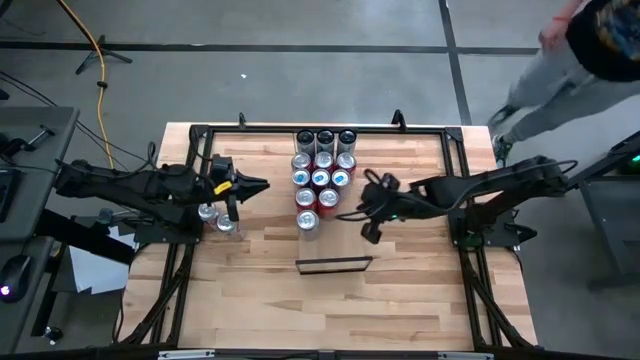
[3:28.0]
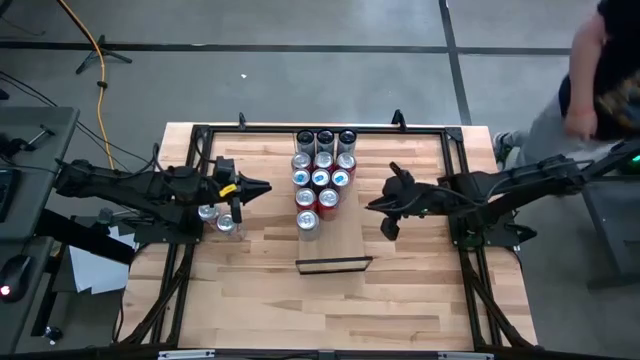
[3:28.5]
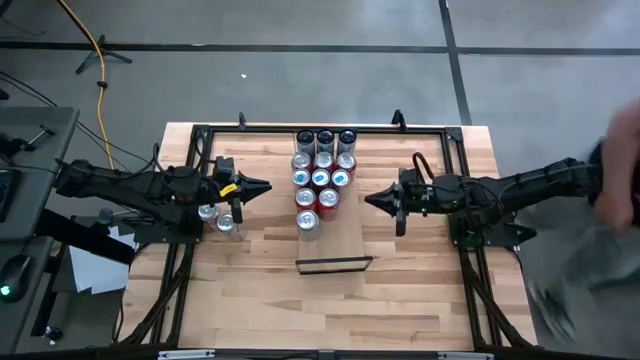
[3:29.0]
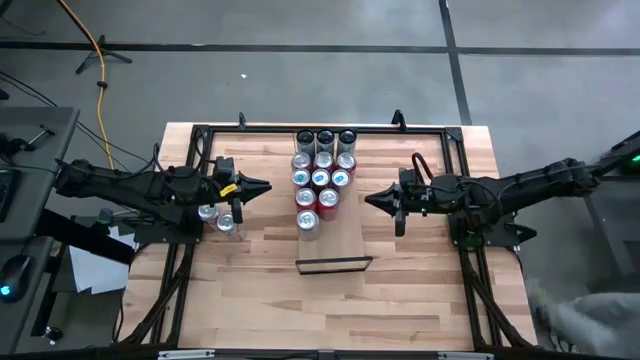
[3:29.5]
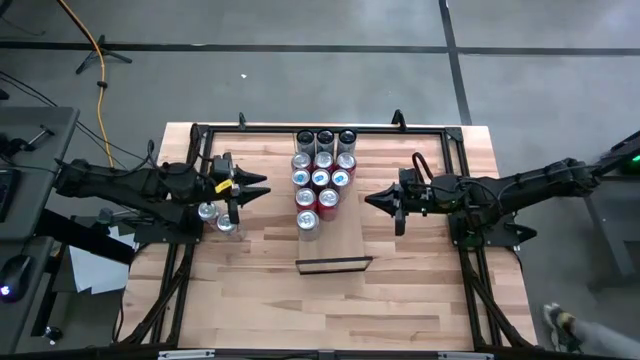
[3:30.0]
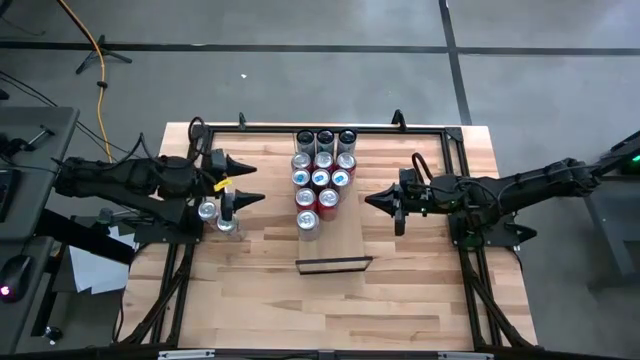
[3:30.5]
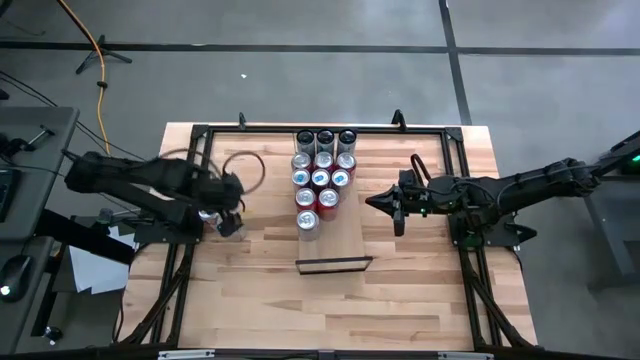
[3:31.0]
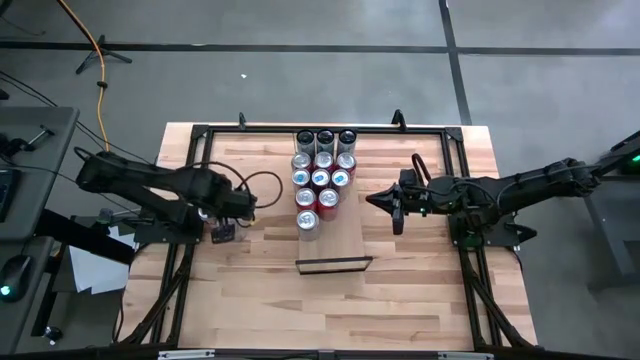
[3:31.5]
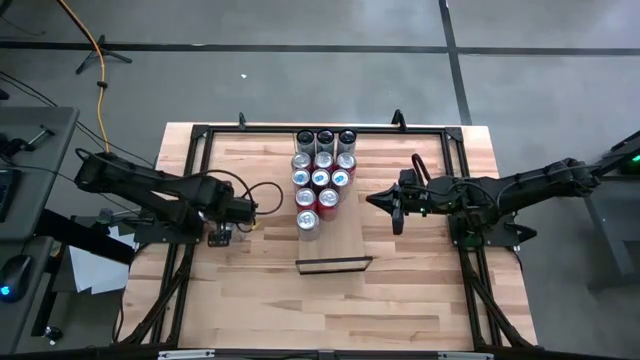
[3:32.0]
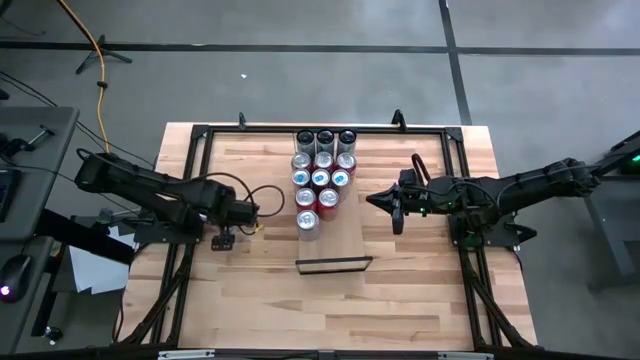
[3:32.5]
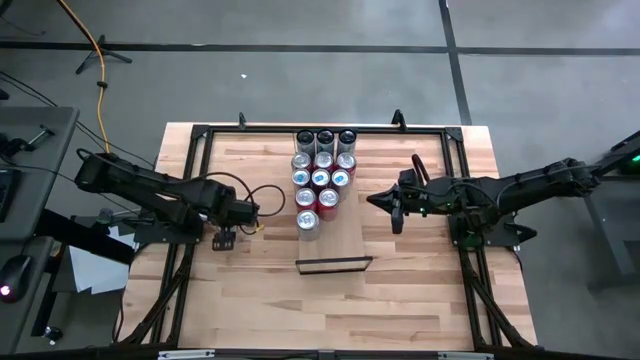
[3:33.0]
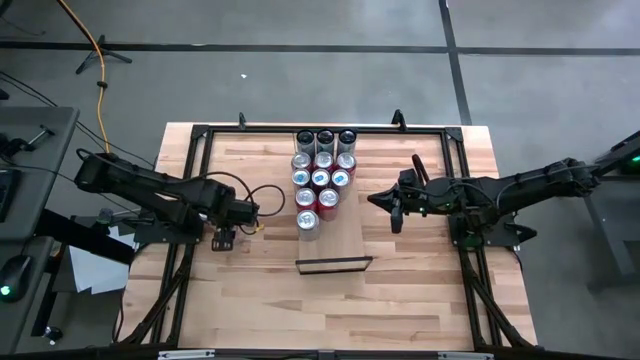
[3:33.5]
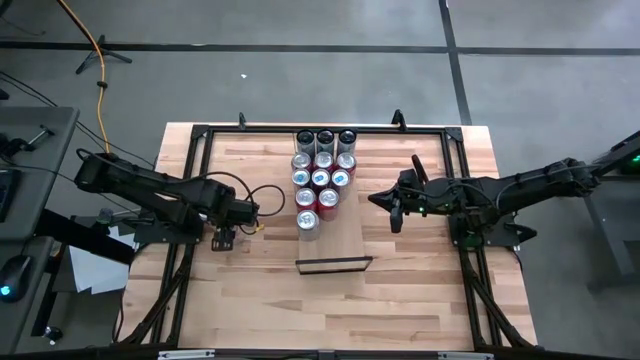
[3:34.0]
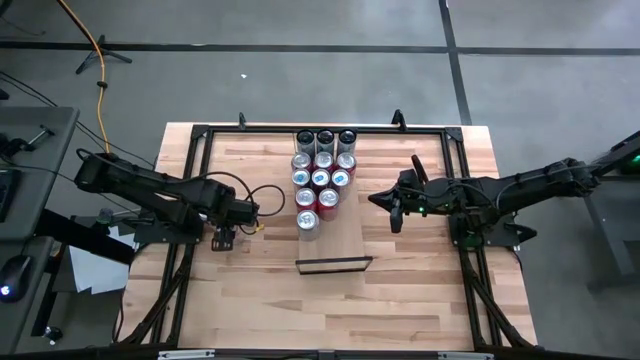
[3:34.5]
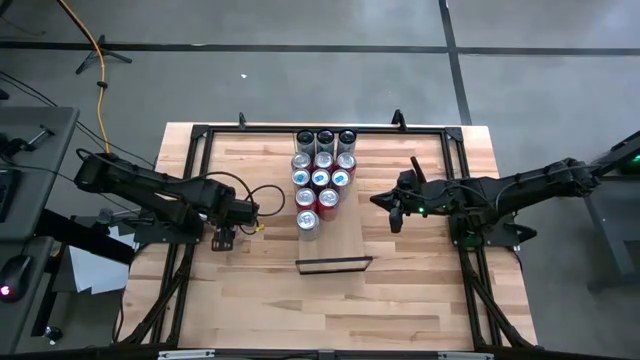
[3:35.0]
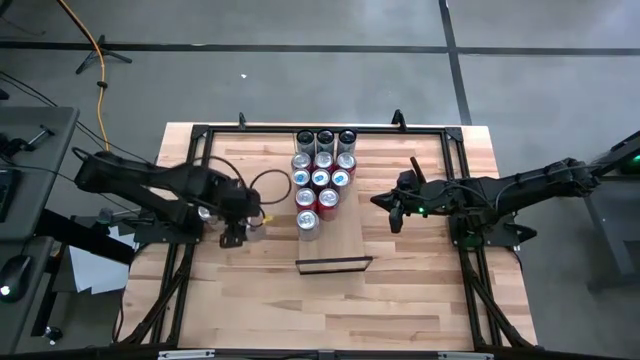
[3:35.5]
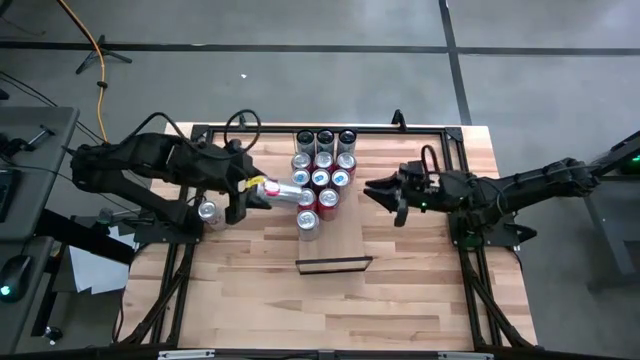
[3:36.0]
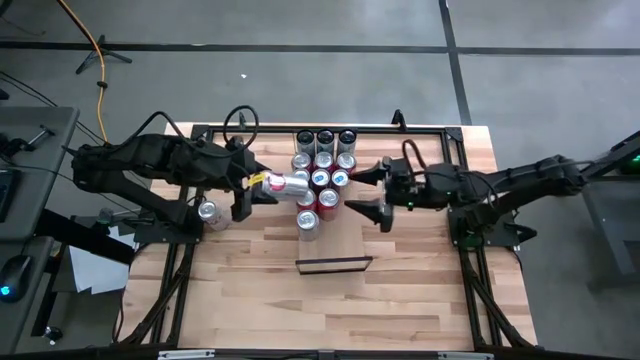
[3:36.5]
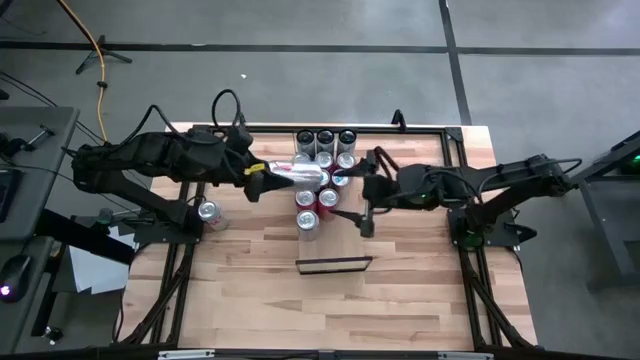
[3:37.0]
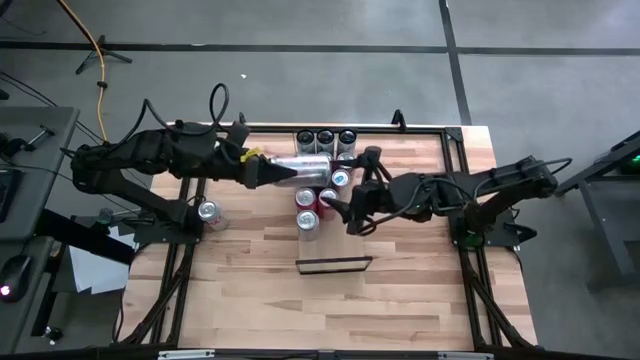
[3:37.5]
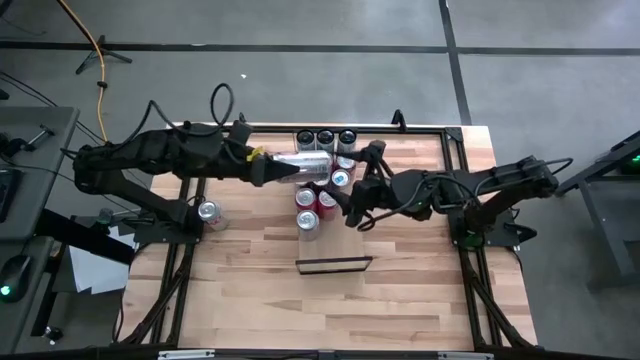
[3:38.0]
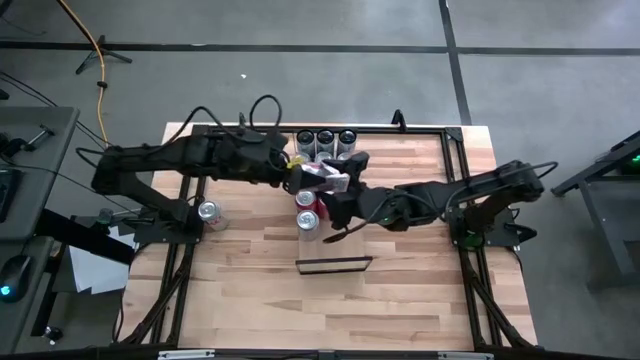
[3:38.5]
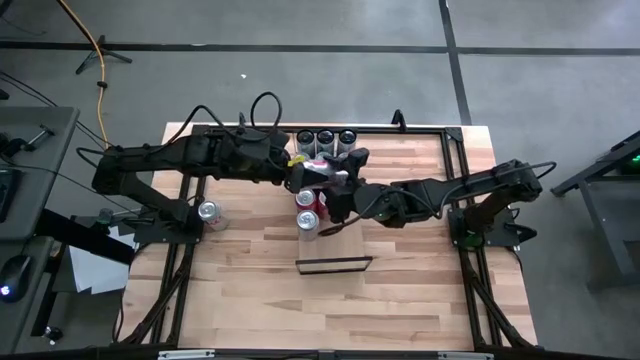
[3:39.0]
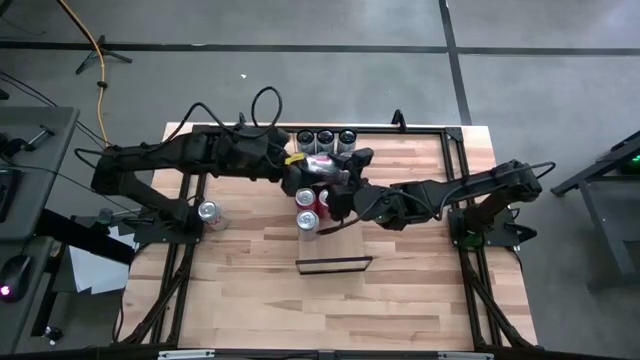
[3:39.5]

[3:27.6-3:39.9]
Task: Place canned beverage on shelf
Put the right red/silver soda can on the shelf aligned with the other red/silver soda cans

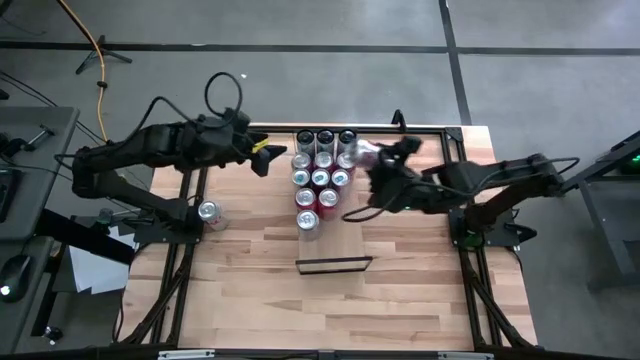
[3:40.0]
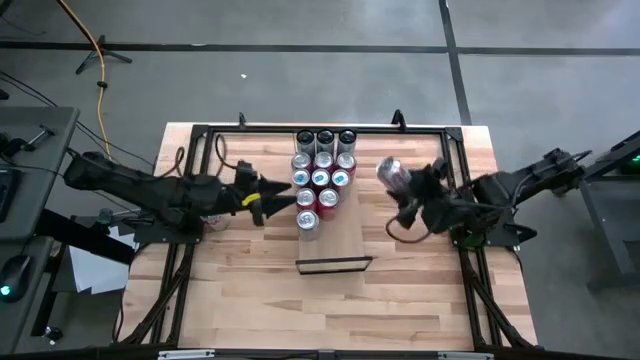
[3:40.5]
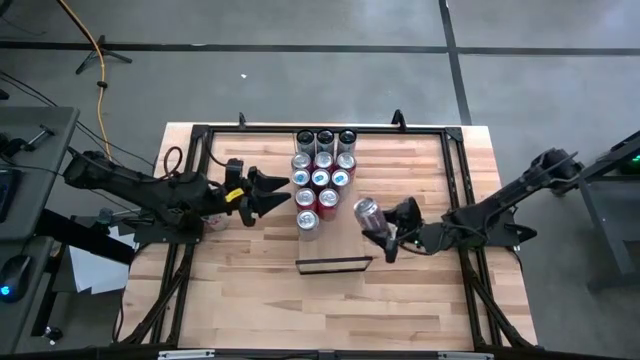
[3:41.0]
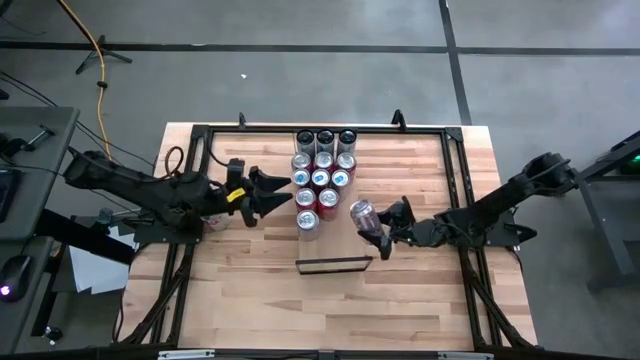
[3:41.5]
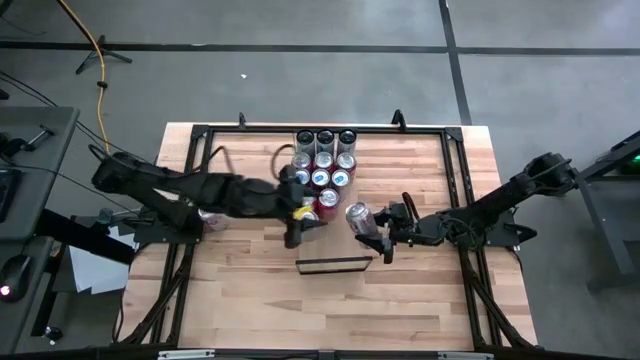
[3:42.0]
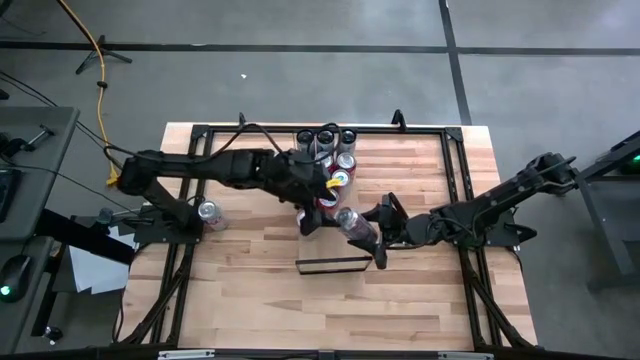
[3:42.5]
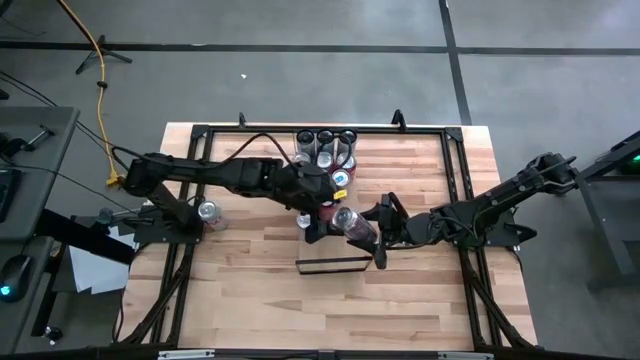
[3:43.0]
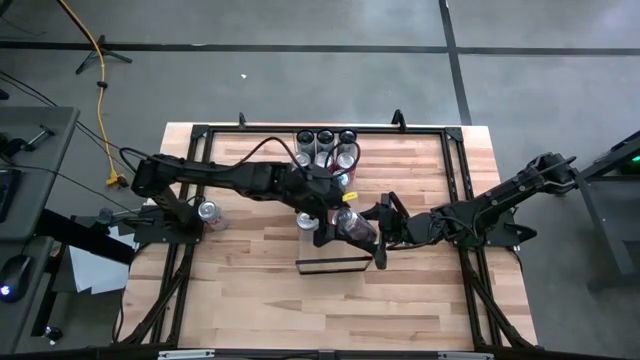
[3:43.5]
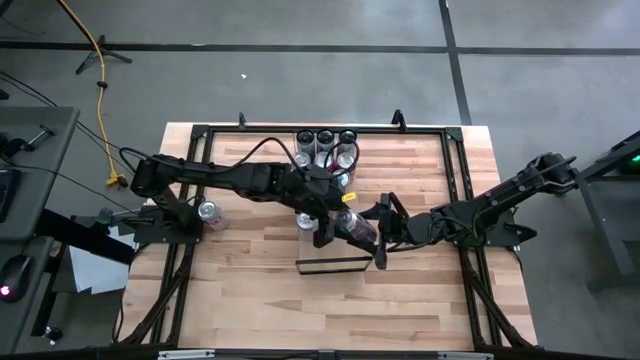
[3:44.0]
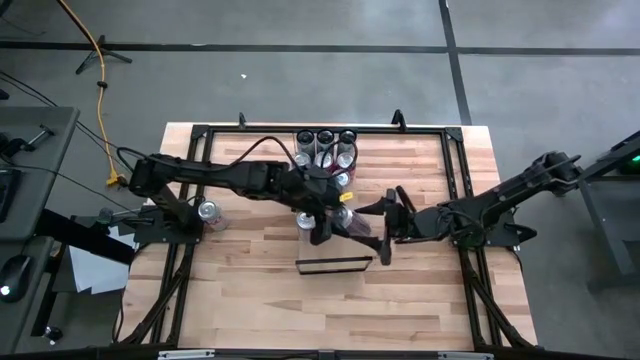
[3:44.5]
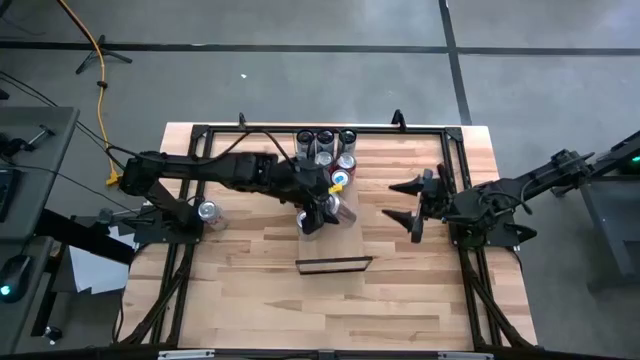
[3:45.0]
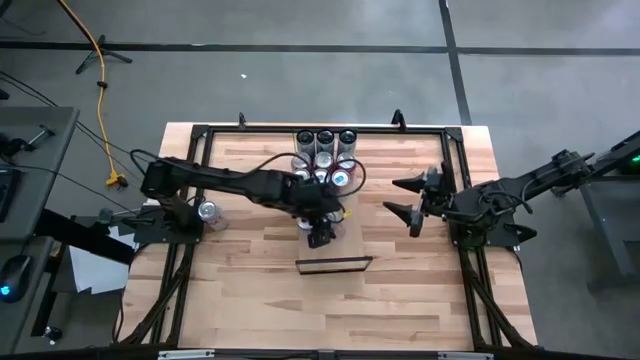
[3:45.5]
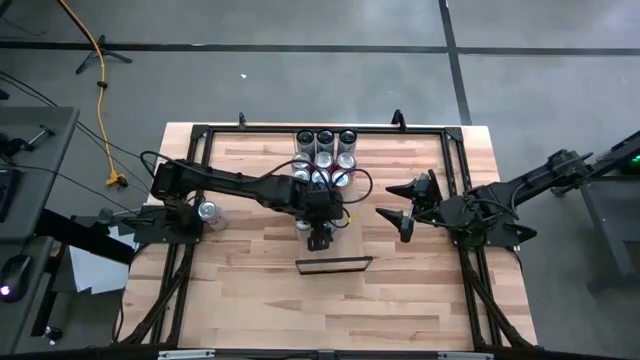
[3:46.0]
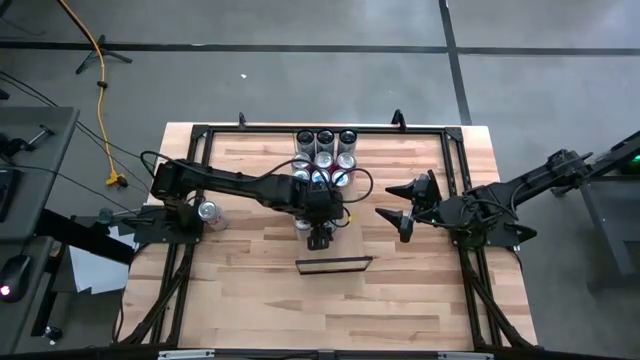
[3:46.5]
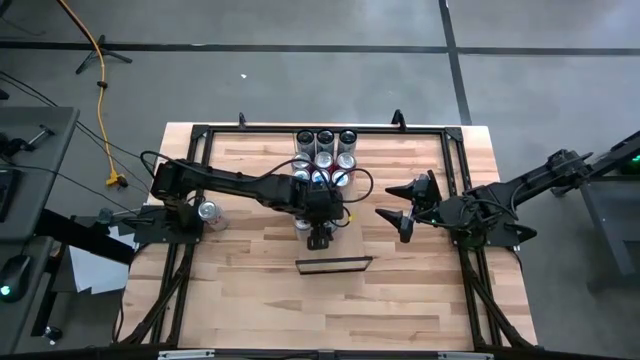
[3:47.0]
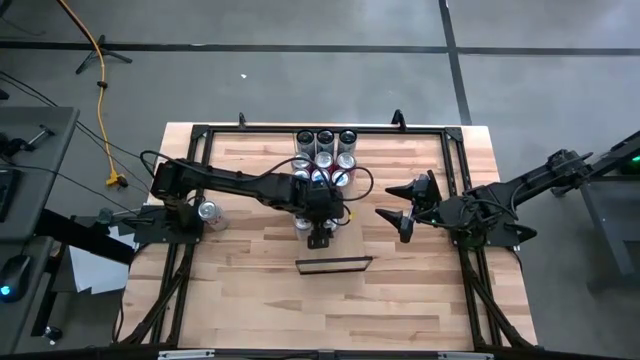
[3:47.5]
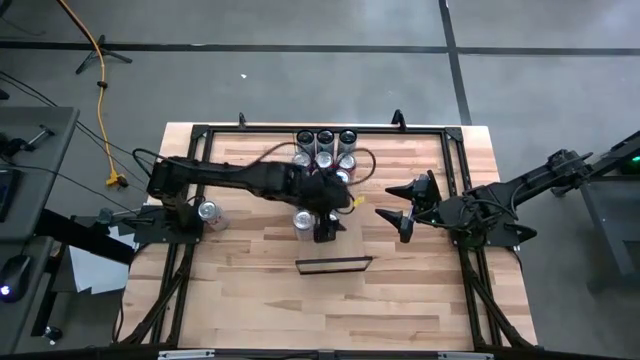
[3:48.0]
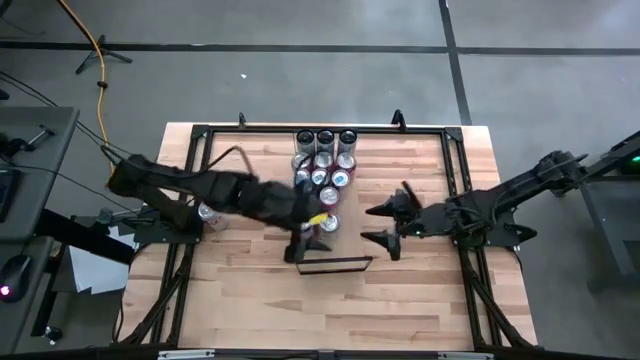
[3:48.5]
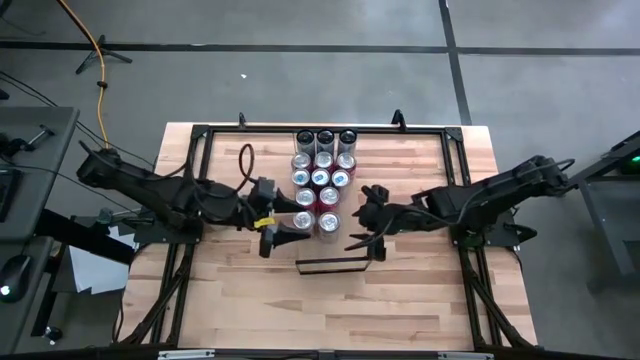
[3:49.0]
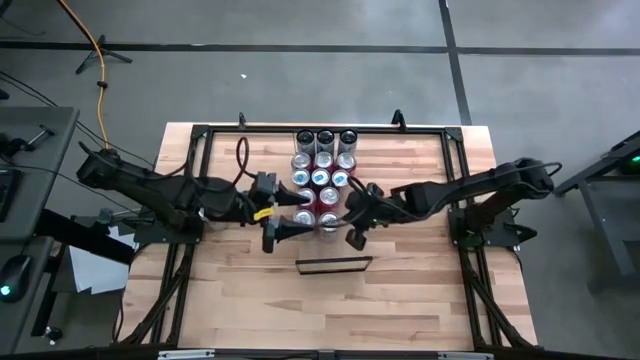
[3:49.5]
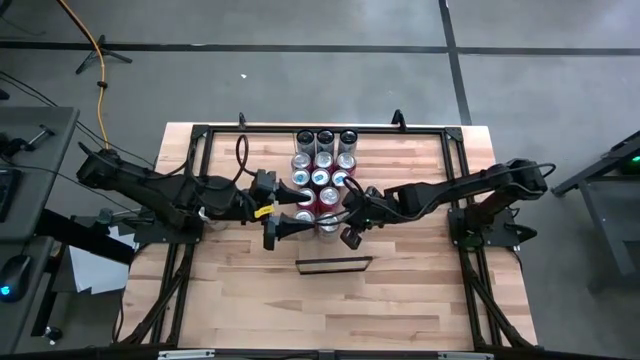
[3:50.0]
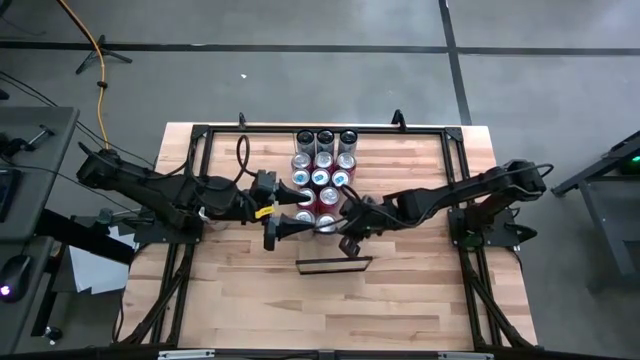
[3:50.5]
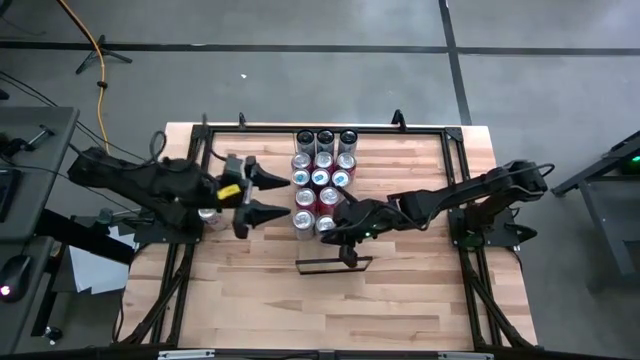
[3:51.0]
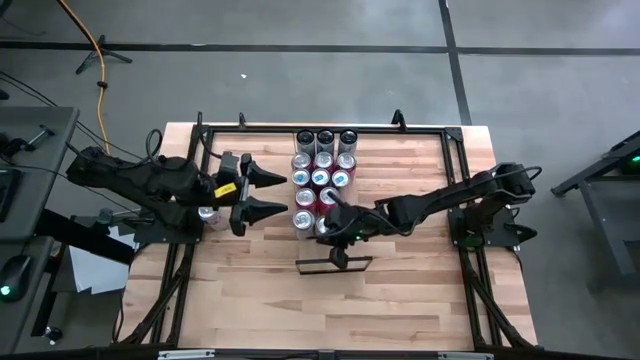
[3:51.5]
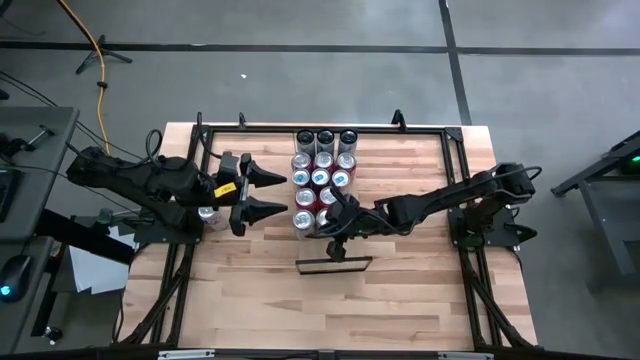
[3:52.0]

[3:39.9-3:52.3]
Put the right red/silver soda can on the shelf aligned with the other red/silver soda cans
